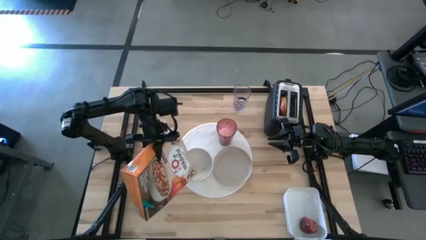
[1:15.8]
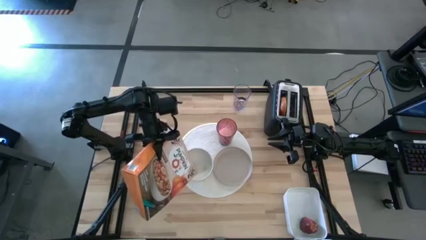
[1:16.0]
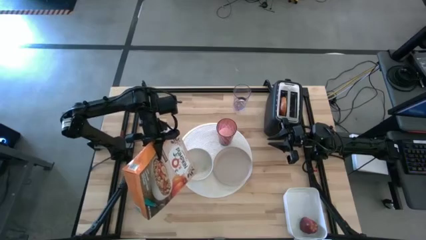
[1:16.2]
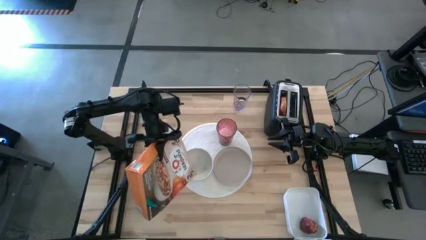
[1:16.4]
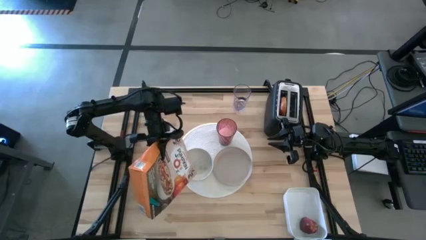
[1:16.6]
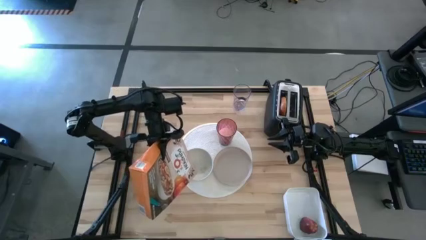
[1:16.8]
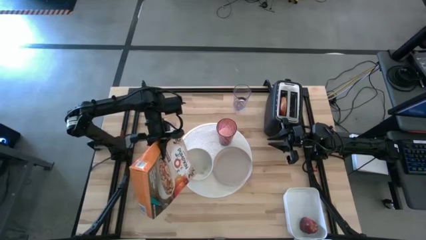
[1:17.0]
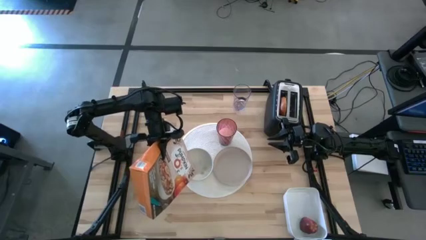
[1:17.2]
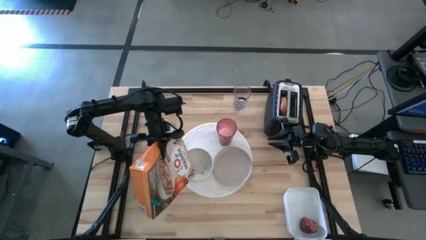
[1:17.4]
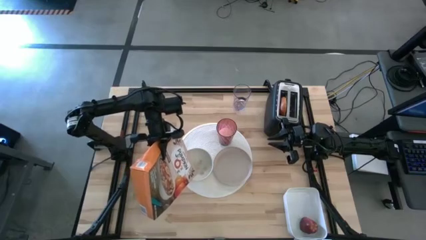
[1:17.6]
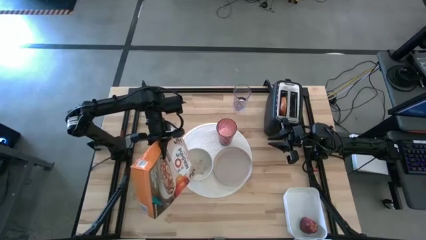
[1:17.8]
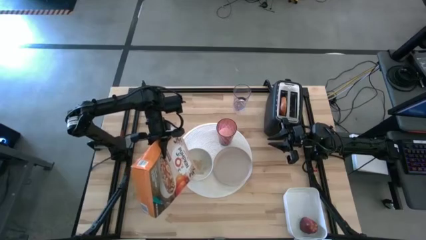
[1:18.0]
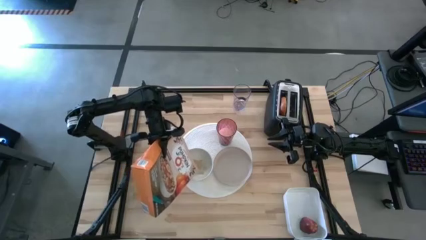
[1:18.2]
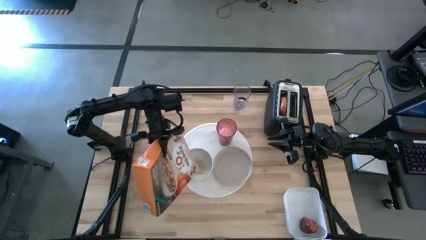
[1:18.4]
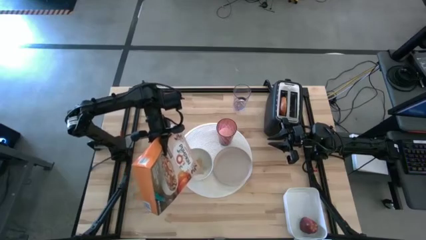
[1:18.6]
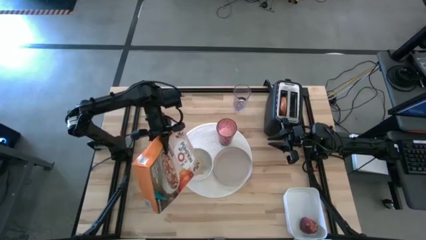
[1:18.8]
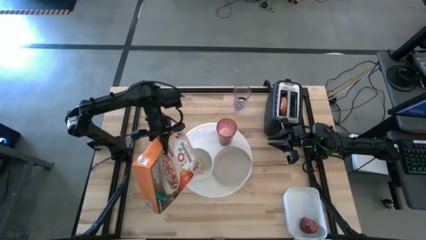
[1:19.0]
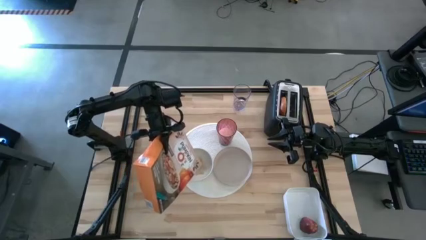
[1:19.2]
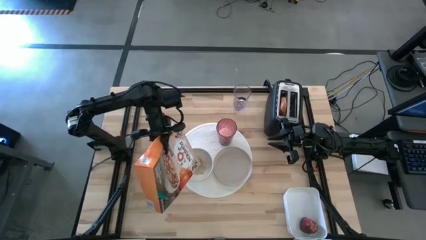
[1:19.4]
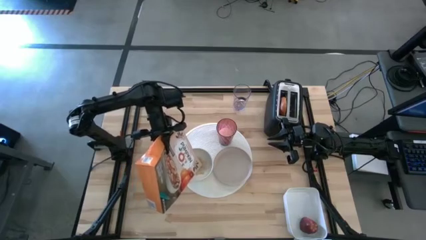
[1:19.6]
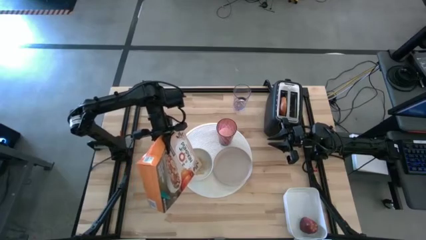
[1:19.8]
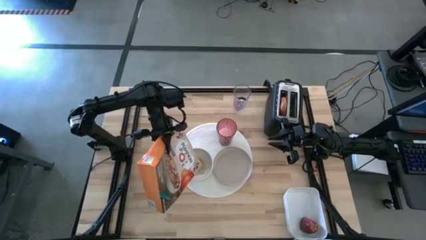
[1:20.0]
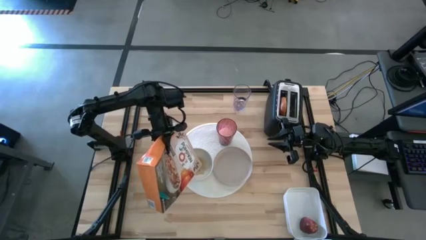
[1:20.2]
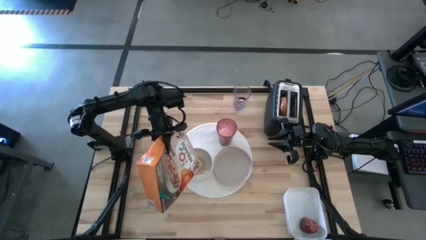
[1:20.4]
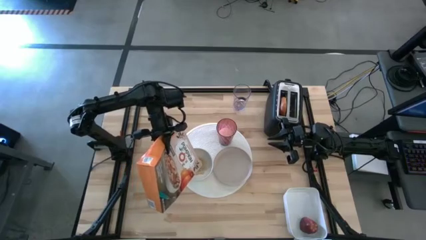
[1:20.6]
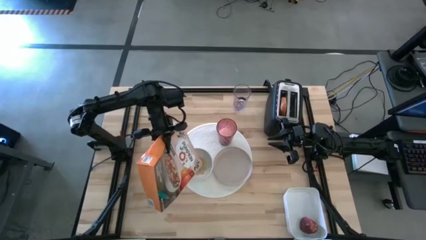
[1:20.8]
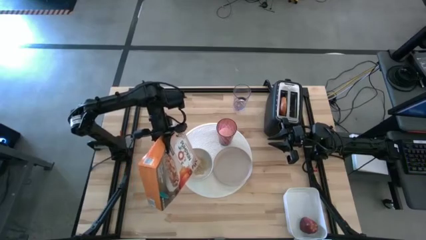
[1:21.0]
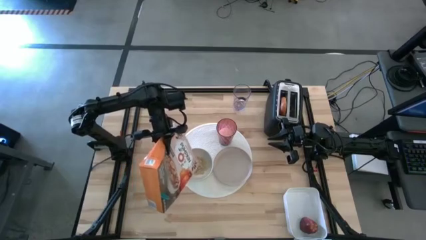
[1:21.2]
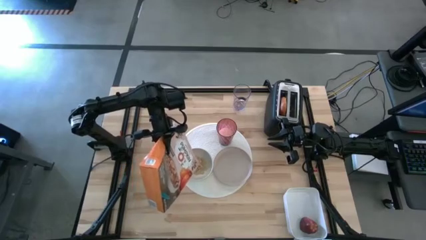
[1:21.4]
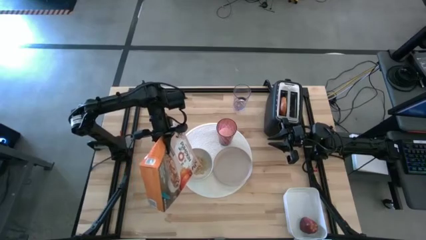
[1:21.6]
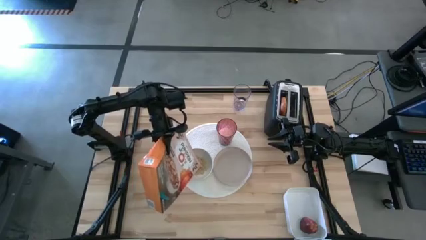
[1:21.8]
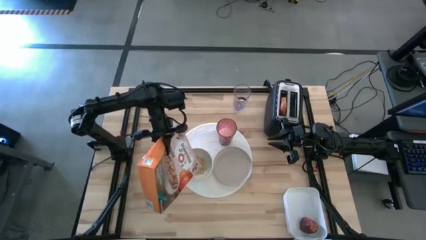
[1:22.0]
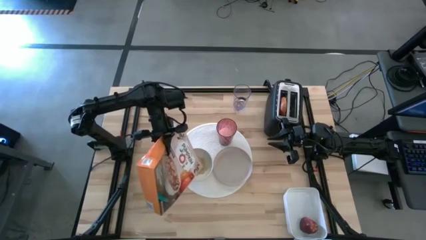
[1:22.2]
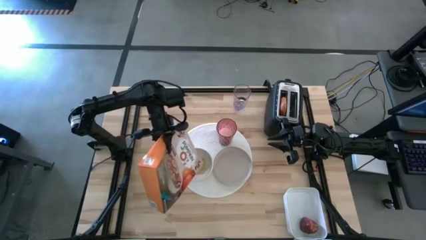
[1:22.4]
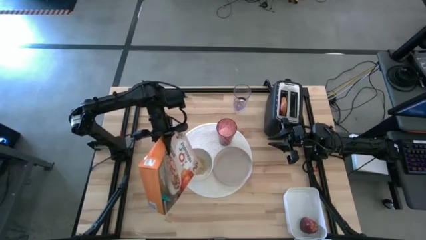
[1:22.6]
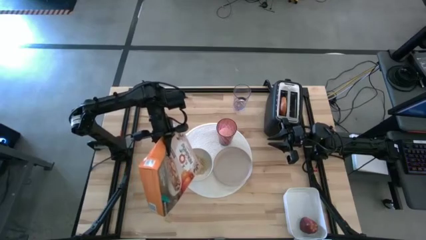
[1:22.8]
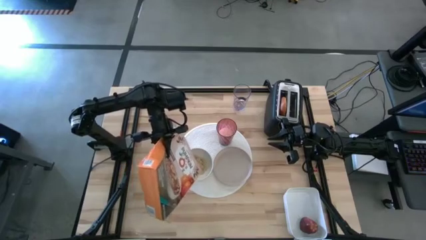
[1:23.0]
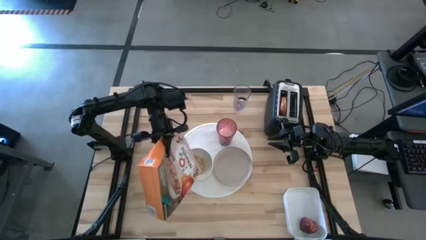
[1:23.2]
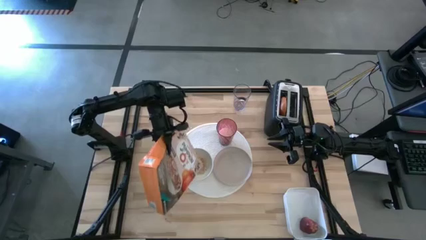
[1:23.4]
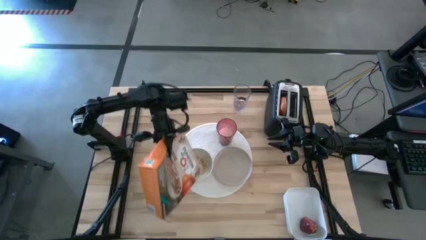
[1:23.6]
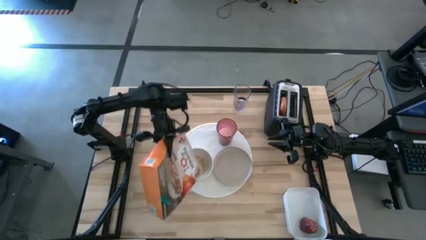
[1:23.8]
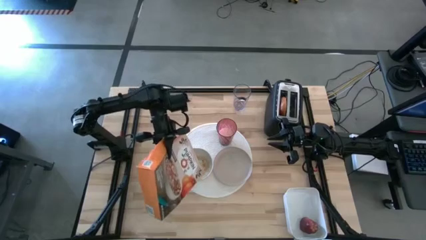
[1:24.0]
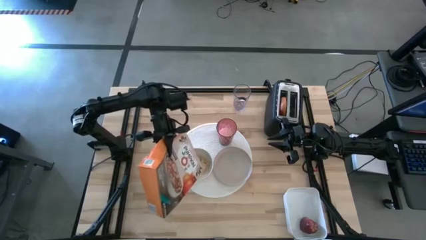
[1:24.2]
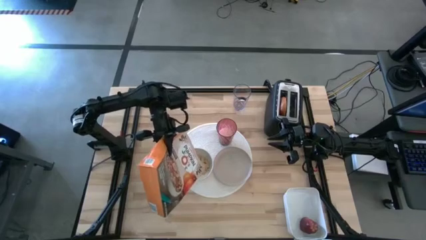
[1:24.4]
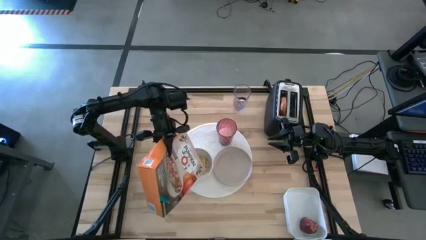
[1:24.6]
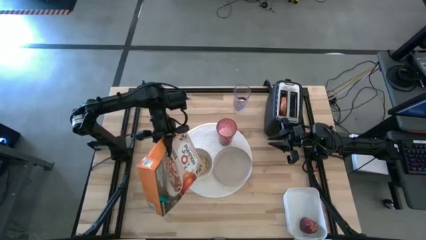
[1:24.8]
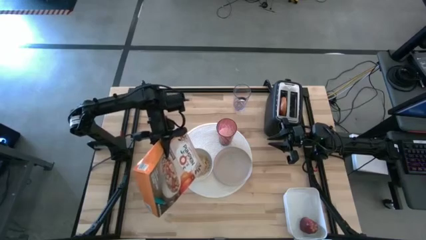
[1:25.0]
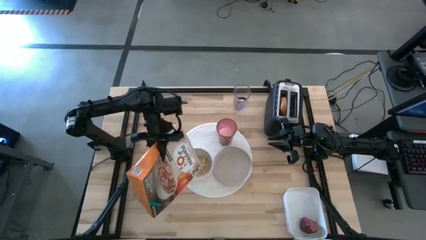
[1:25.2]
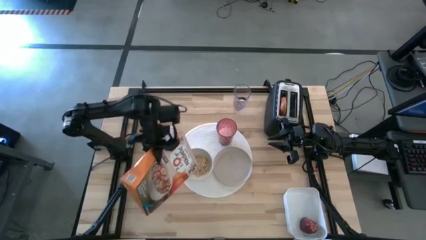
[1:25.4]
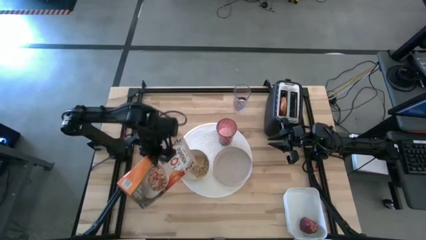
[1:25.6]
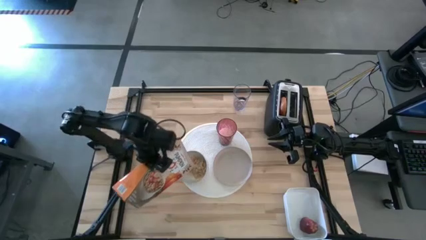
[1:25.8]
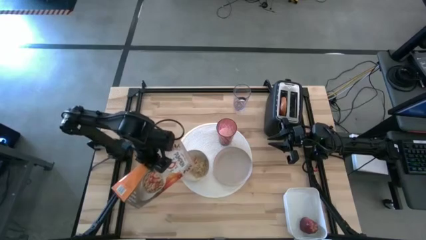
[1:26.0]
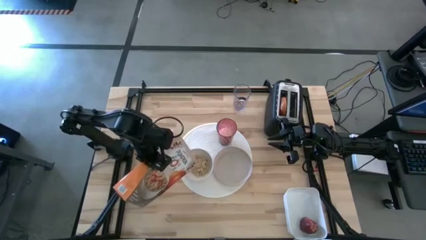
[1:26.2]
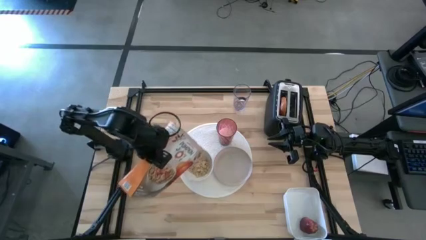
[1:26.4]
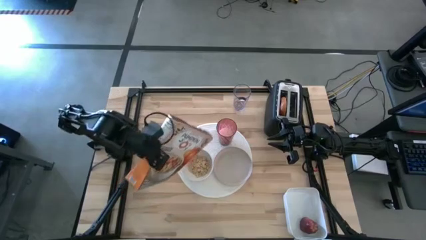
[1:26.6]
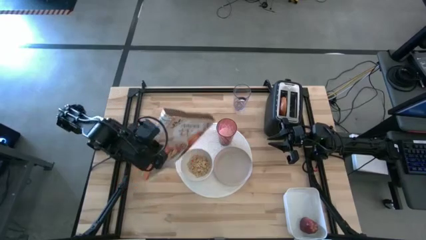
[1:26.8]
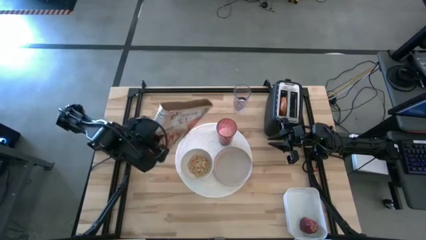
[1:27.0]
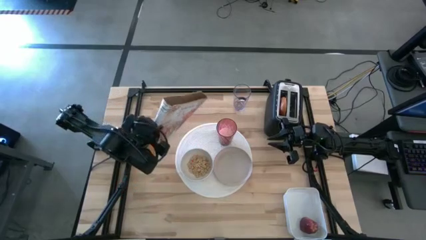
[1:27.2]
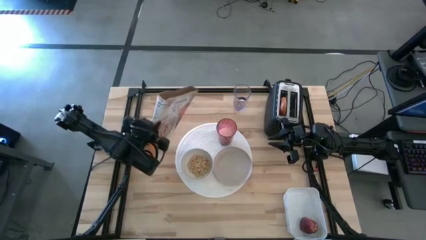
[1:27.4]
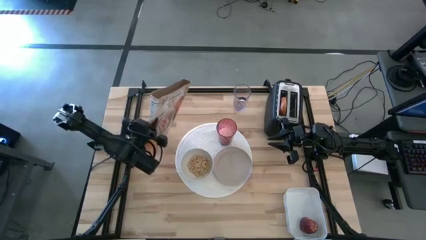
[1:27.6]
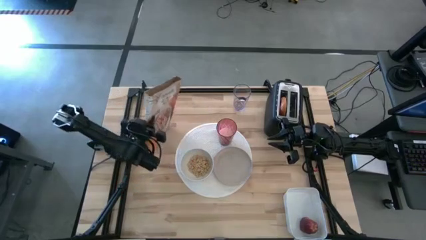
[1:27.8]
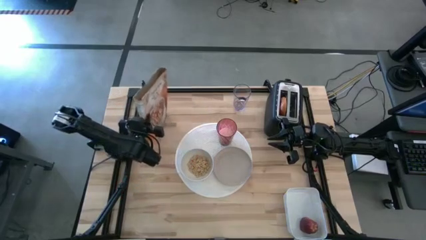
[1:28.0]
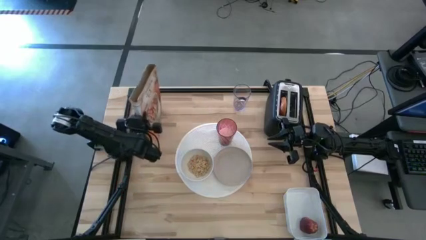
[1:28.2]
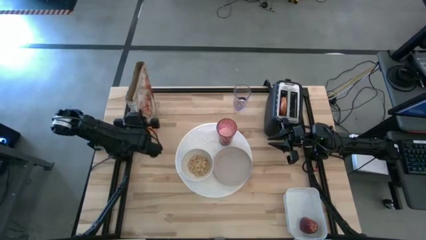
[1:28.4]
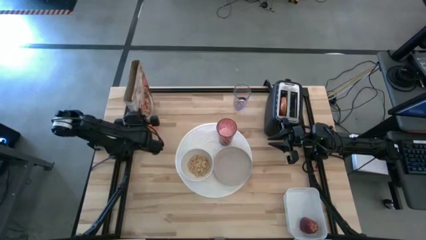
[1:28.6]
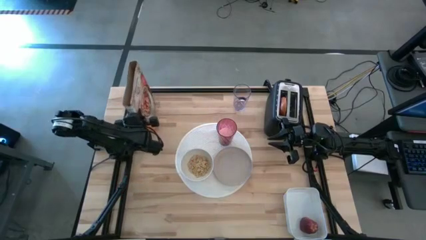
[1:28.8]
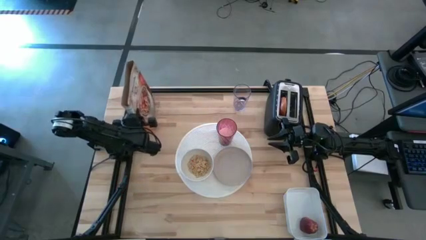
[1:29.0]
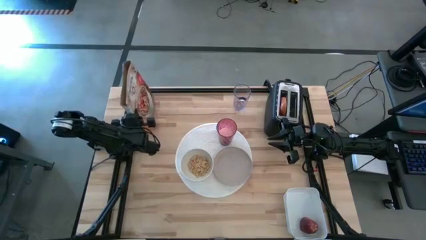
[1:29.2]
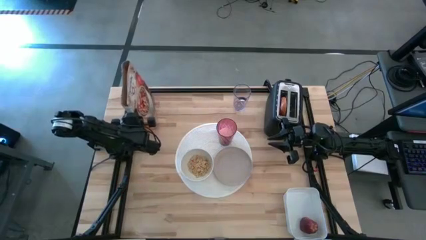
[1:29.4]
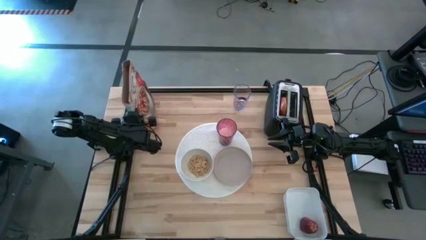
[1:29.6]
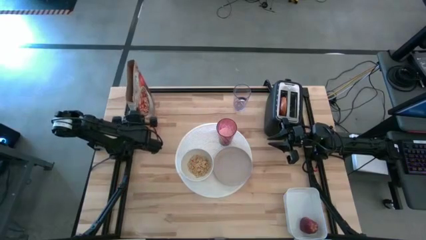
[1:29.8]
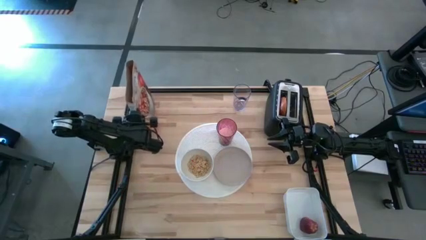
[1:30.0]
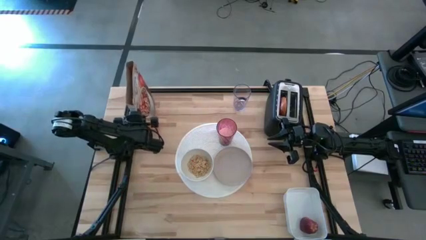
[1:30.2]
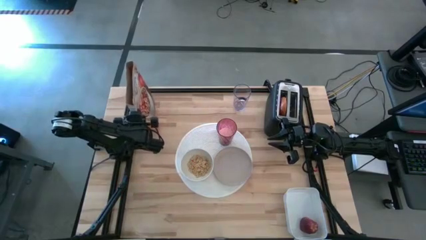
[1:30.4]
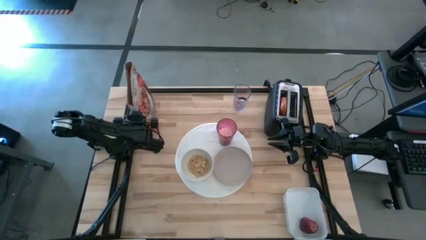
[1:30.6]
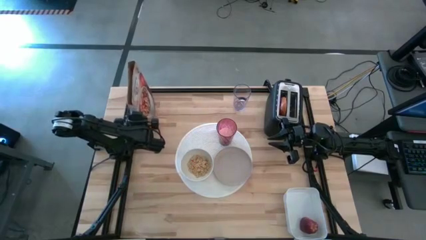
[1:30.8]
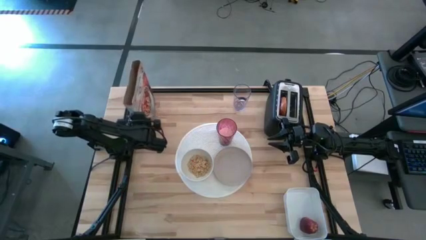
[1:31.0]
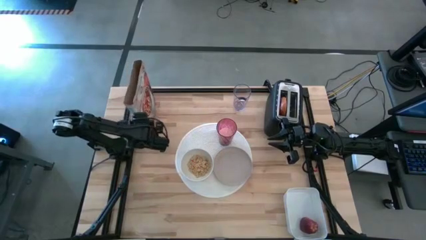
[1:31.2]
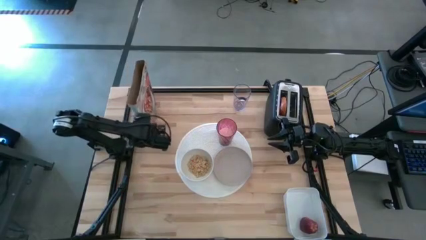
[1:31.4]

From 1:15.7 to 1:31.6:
Task: Arrange a breakfast setting
Pour the cereal from the orange cereal box into the white bowl

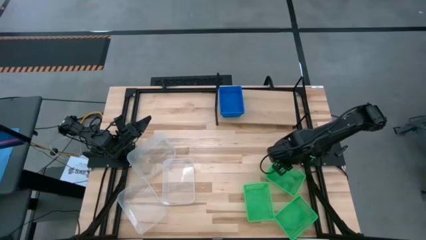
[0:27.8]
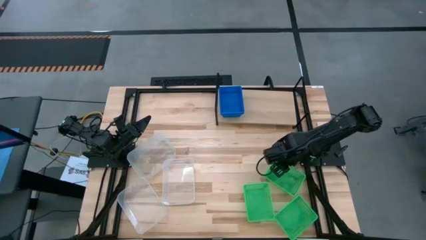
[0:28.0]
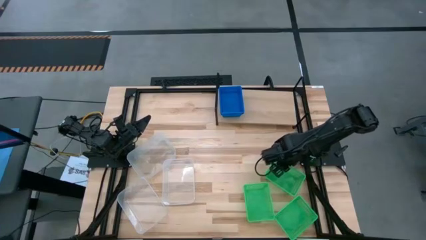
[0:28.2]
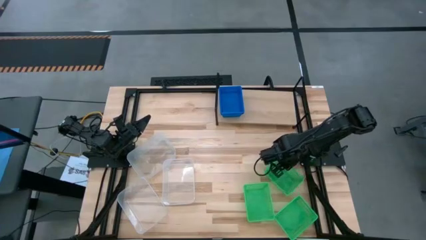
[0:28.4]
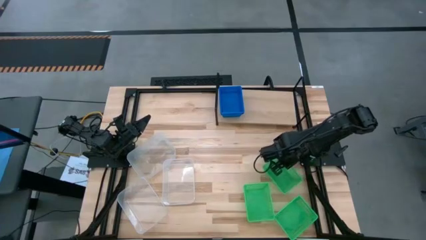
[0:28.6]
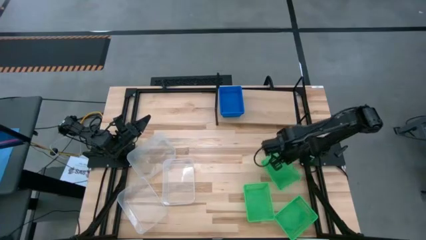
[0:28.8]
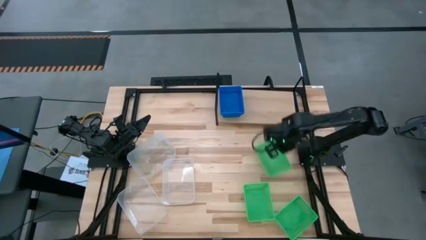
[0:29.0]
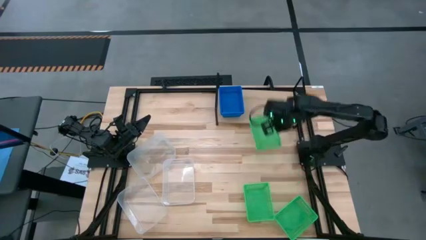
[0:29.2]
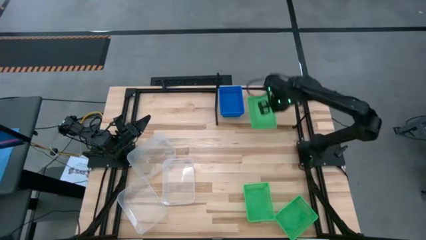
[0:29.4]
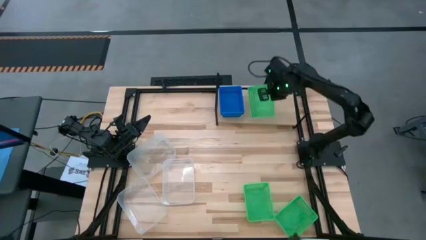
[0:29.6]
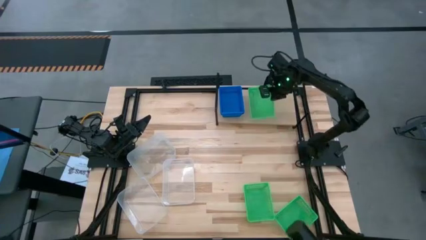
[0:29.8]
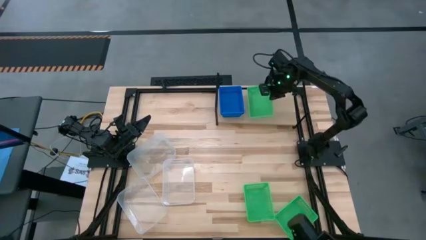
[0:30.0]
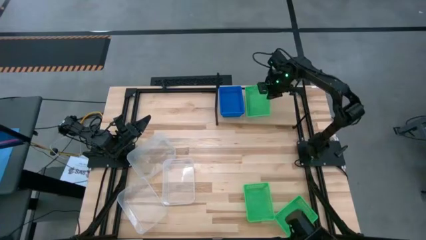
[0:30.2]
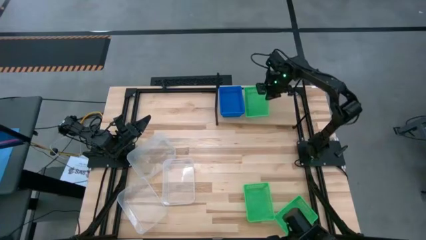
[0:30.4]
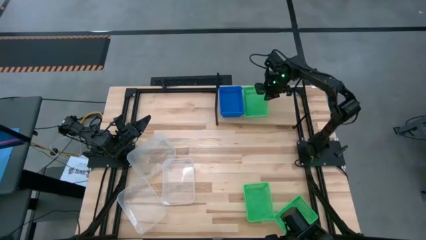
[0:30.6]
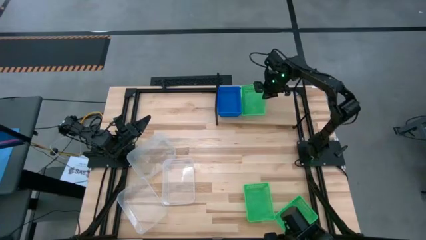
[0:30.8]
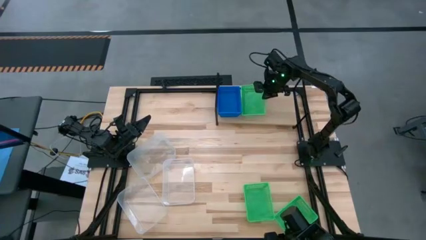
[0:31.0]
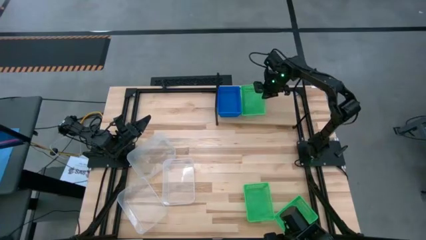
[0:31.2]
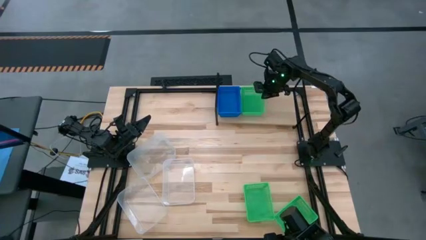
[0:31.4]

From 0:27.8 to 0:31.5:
Task: Stack baskets on shelf by color
Put the top right green bin on the shelf
